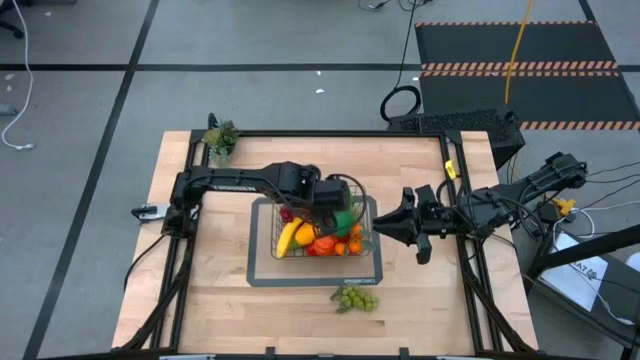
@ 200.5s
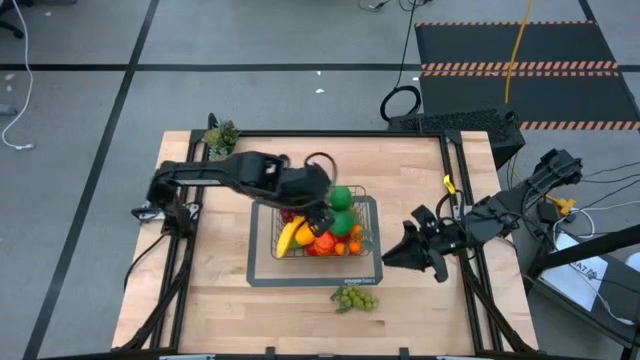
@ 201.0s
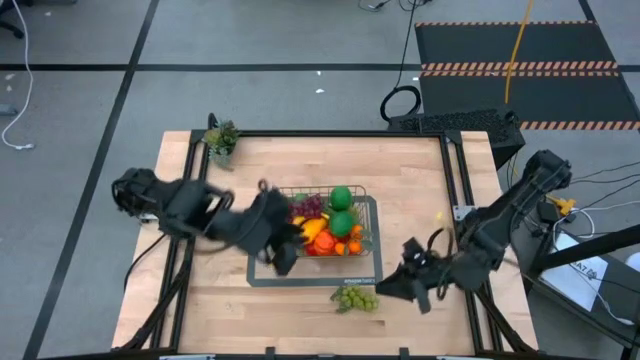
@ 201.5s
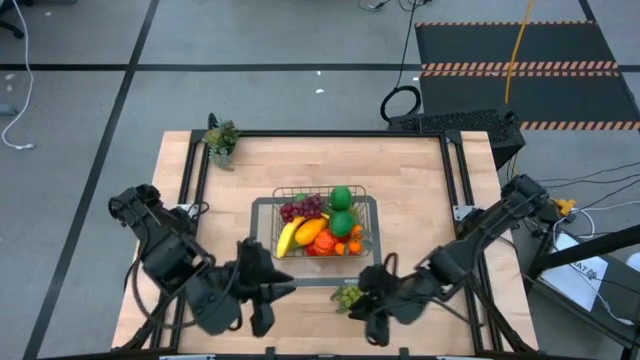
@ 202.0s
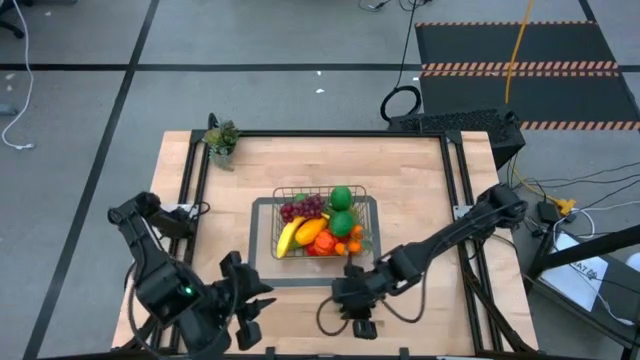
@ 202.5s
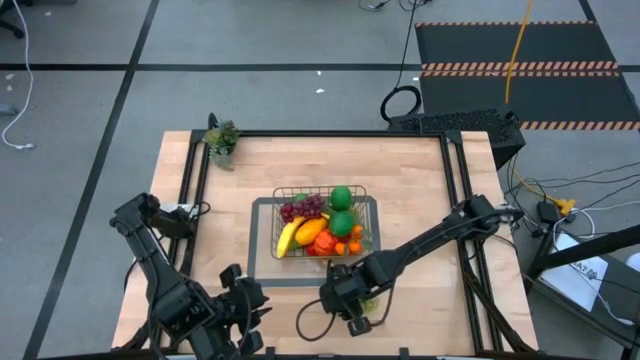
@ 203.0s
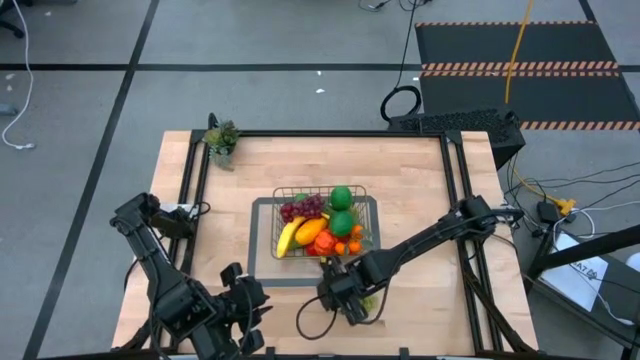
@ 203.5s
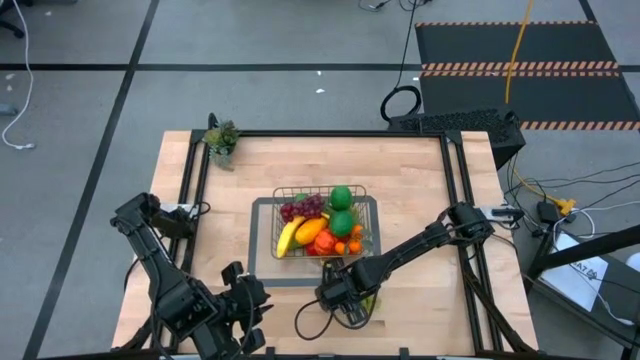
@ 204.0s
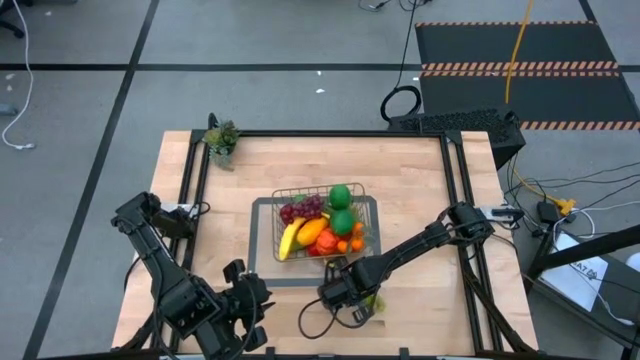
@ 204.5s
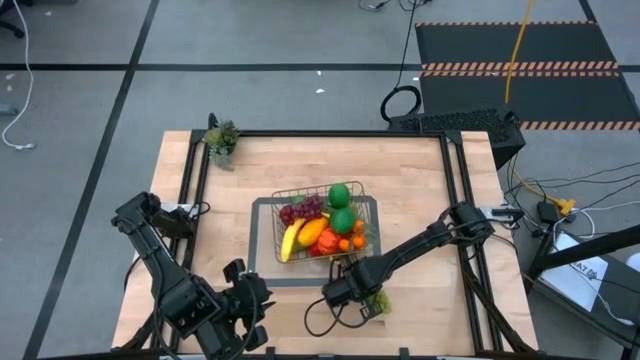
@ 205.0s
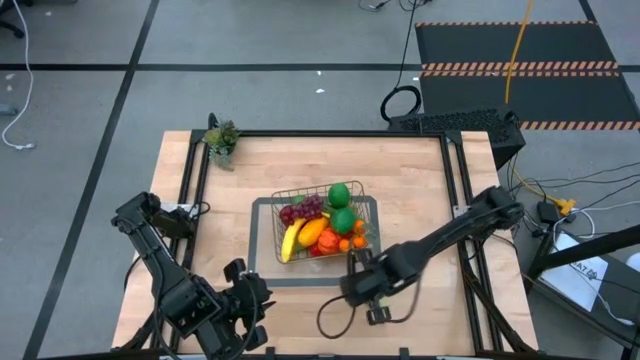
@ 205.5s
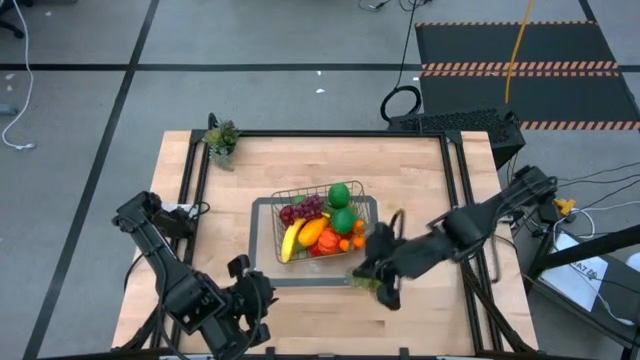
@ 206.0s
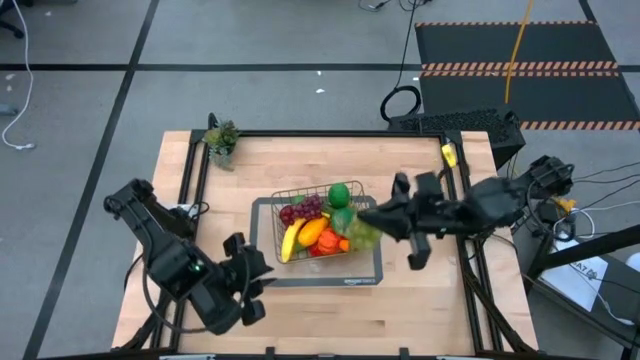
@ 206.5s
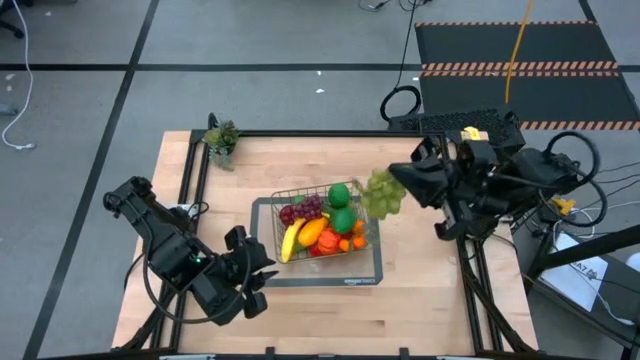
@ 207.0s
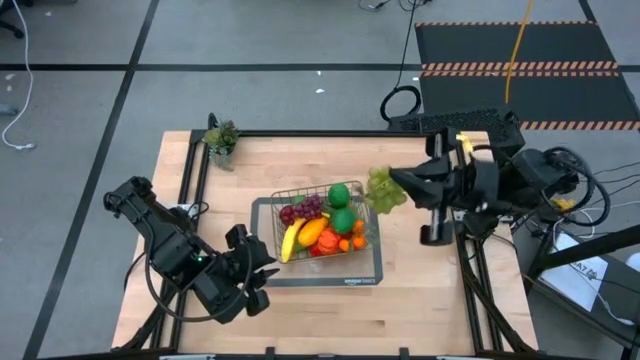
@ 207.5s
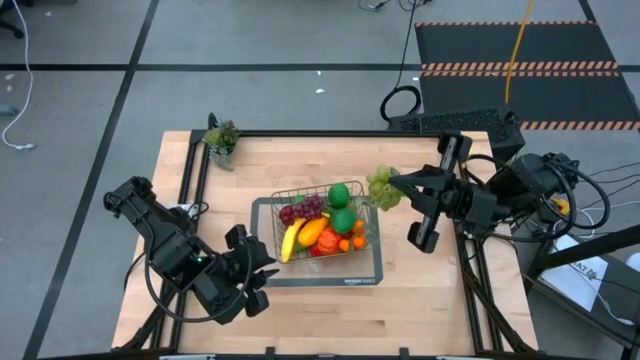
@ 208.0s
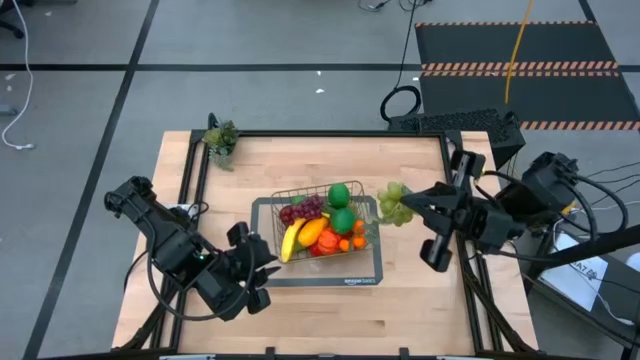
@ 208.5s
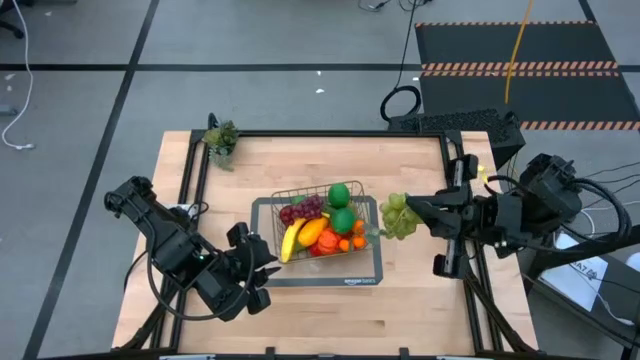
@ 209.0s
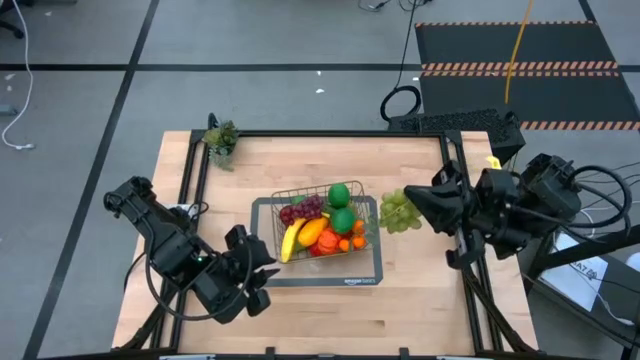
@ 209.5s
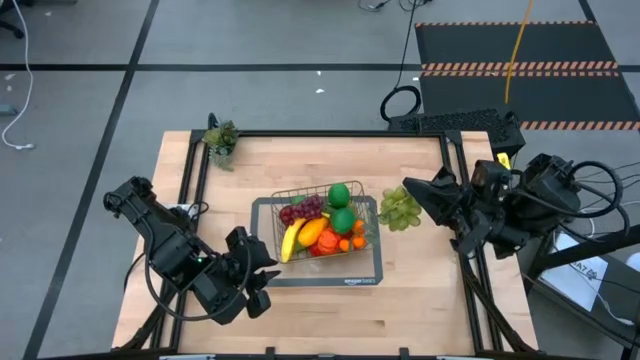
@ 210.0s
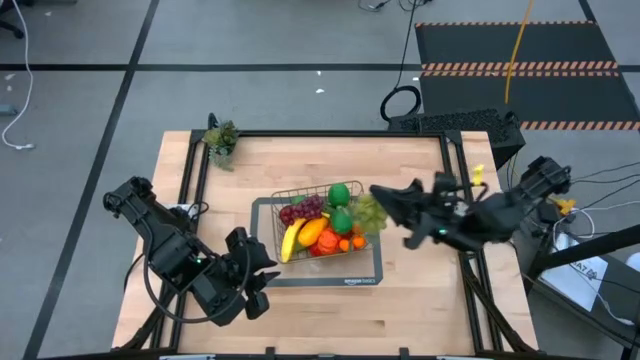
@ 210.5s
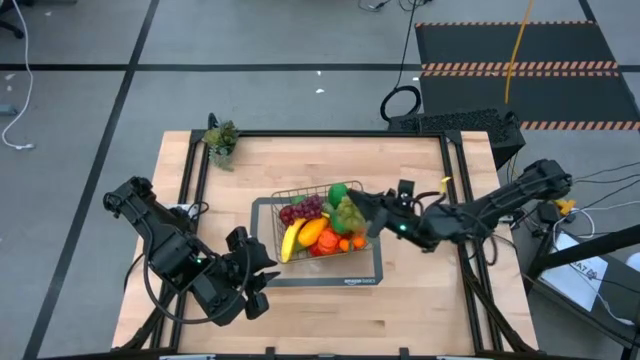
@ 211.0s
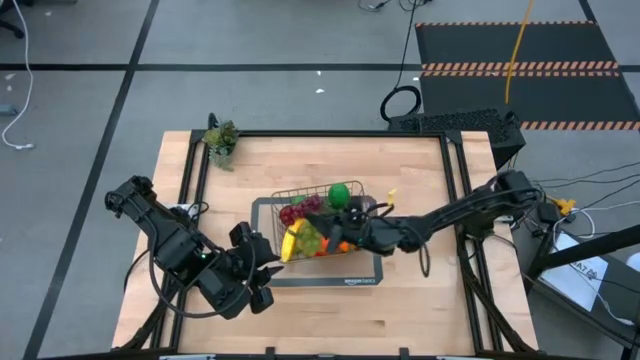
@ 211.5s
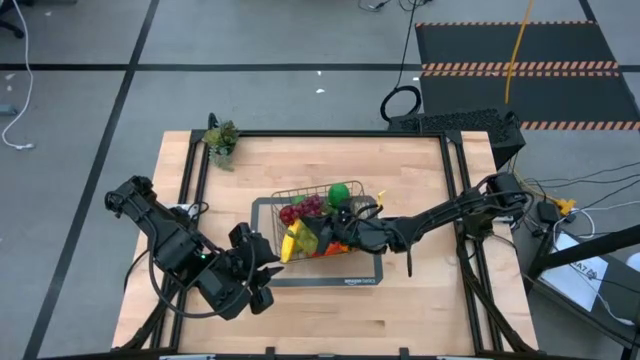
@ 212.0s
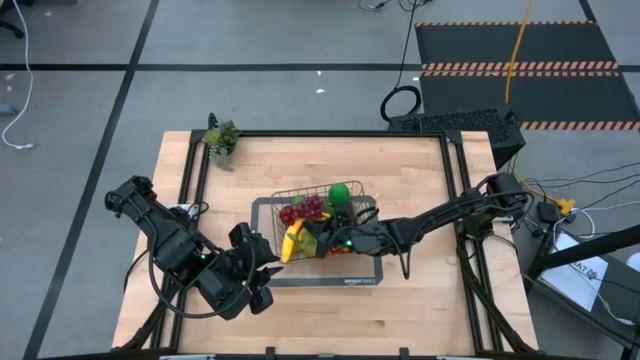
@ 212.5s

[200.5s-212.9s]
Task: Build produce basket
Put the green grapes into the gold wire basket

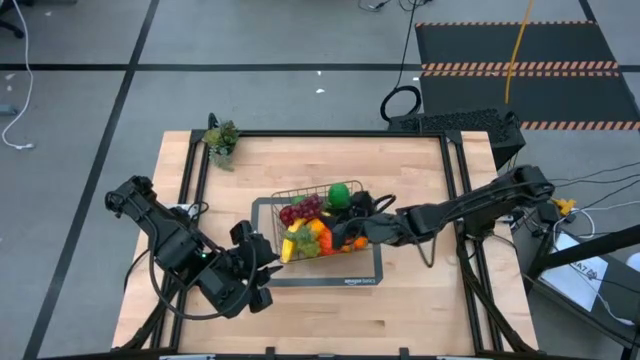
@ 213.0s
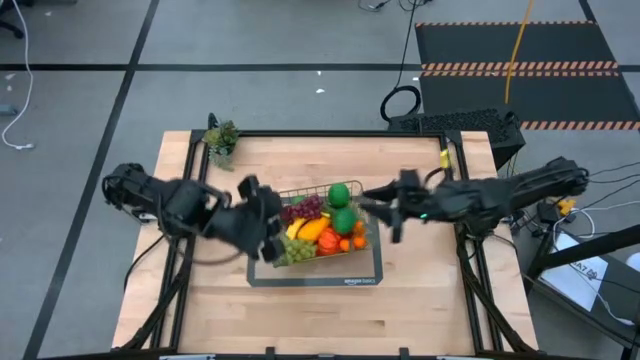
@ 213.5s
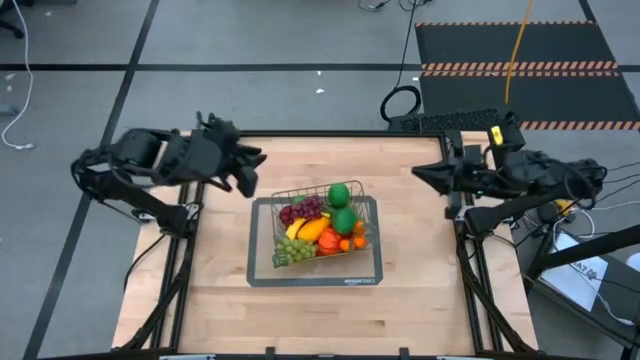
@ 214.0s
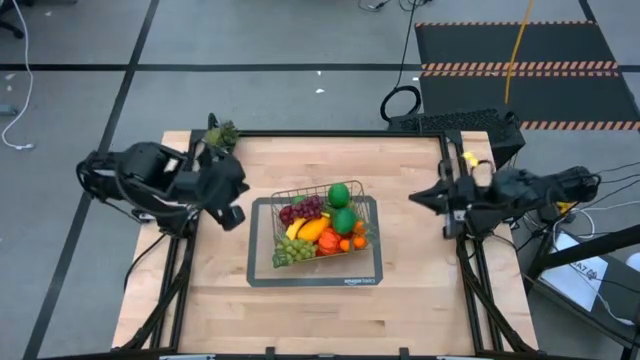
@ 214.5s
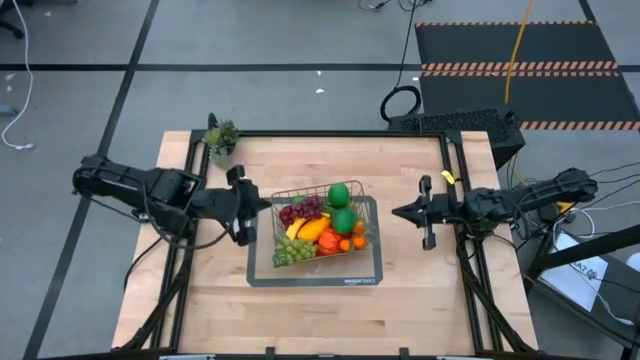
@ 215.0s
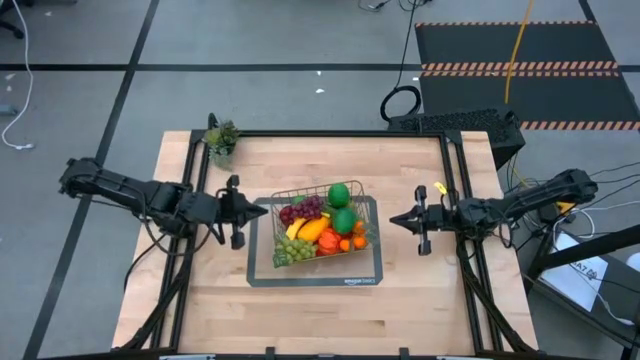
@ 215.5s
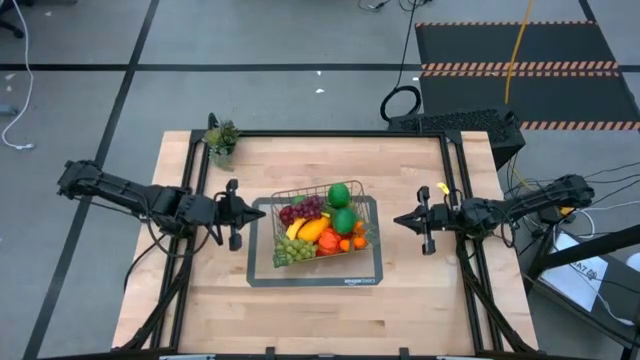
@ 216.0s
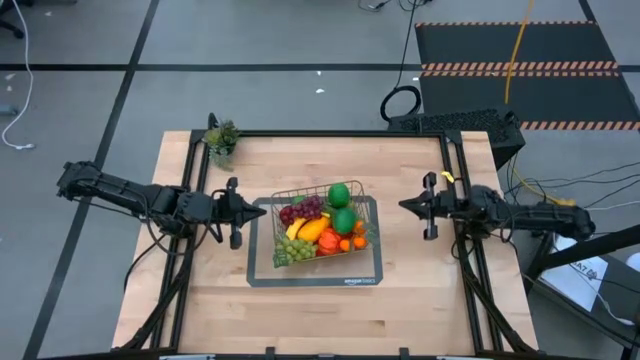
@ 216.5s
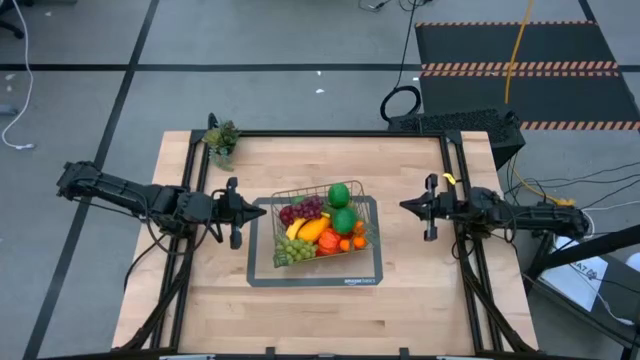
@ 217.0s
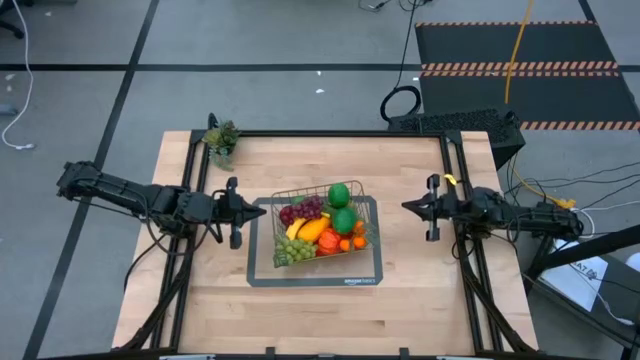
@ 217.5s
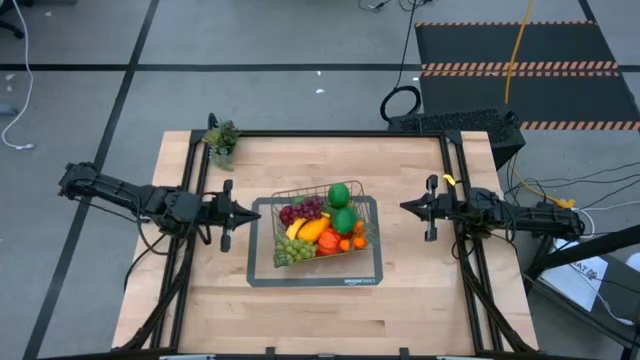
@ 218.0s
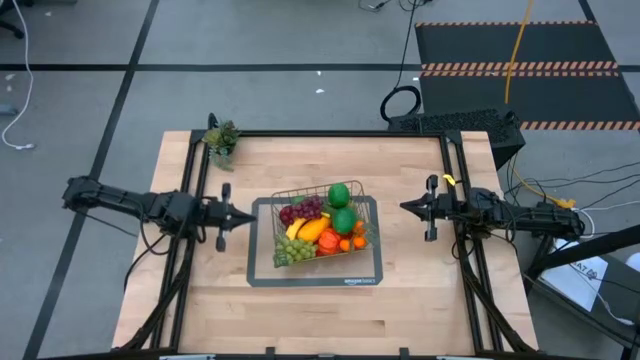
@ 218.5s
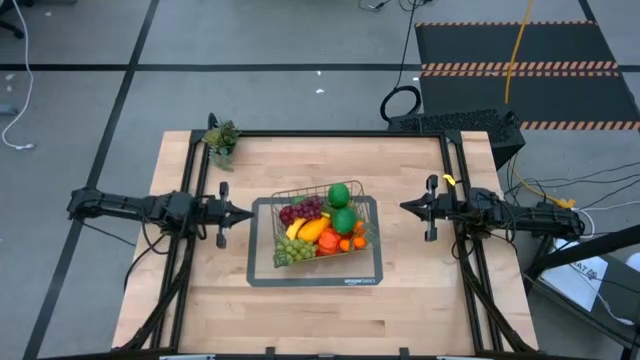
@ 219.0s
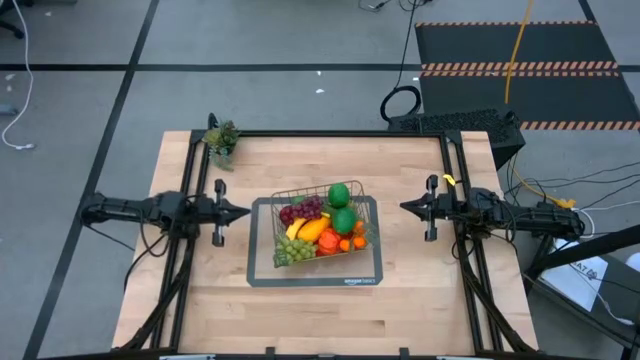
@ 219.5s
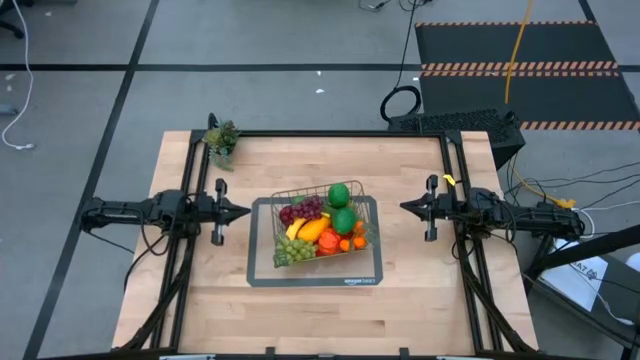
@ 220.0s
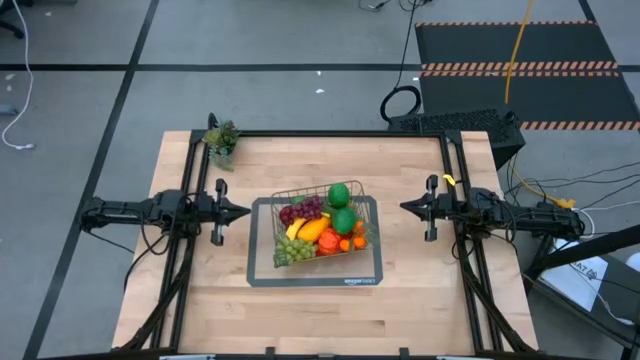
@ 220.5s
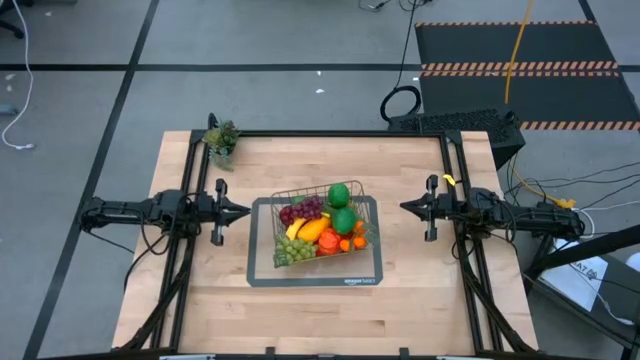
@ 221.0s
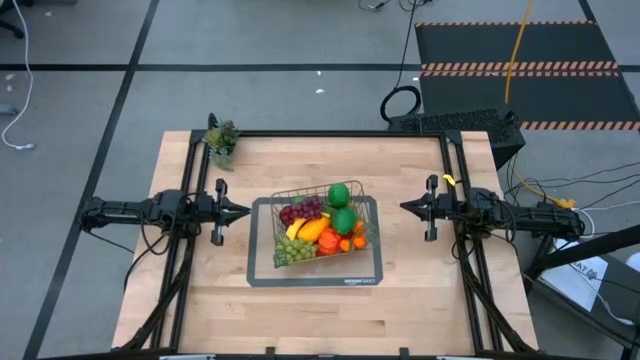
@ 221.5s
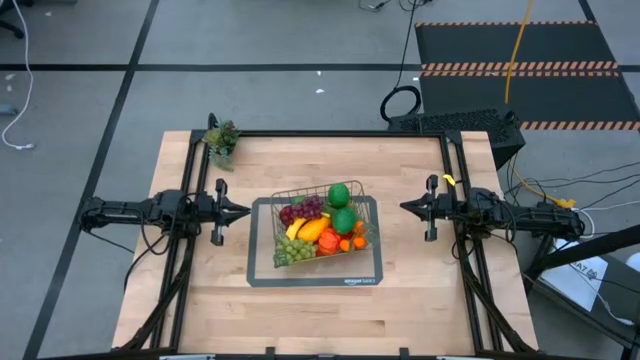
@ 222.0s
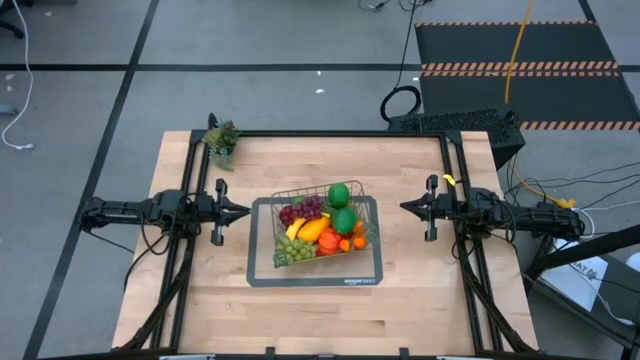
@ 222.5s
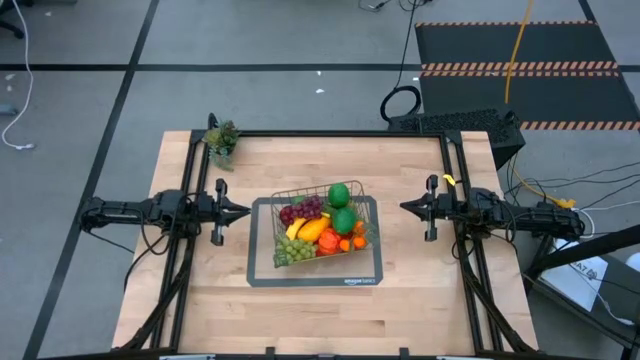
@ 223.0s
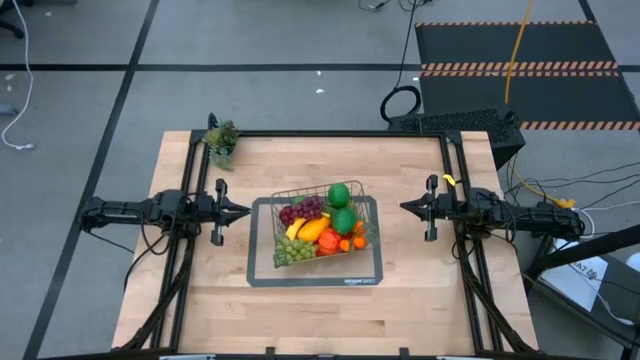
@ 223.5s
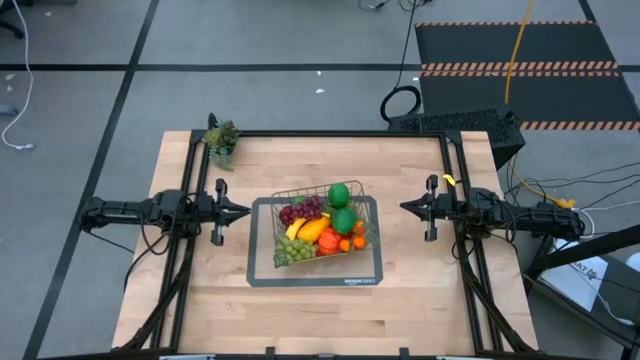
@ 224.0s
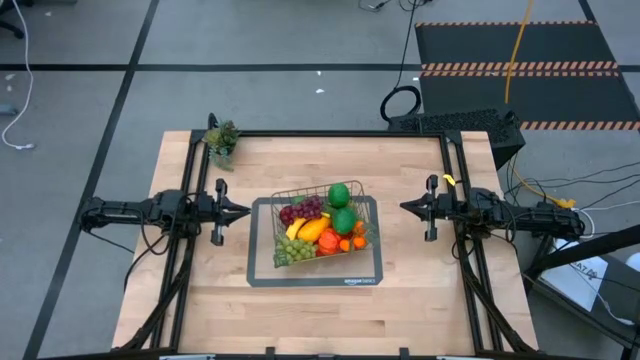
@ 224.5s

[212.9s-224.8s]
Return to Home Position
